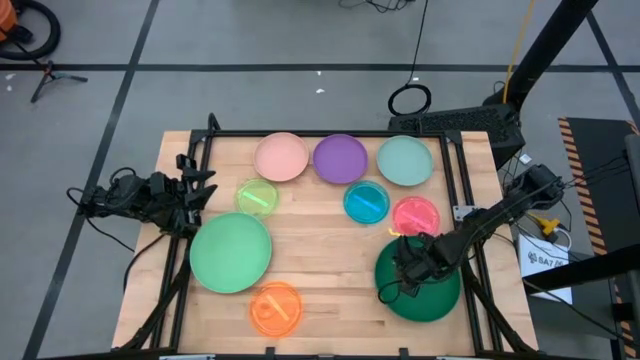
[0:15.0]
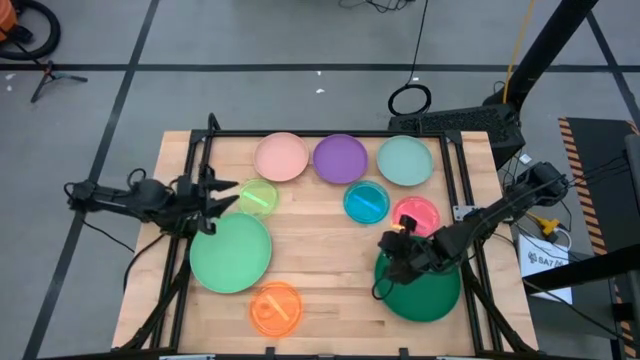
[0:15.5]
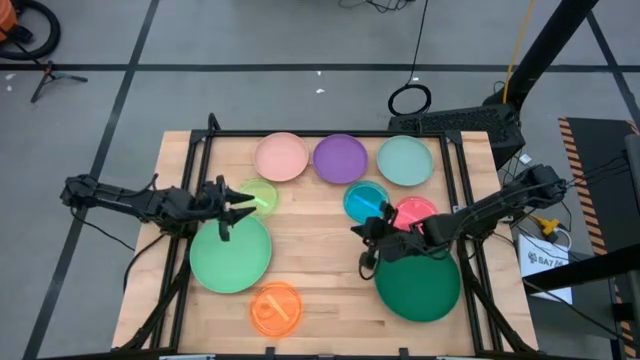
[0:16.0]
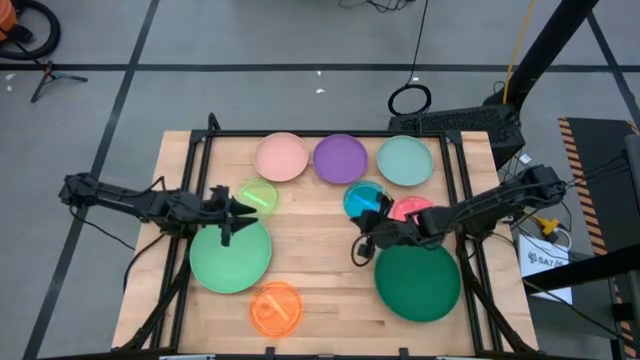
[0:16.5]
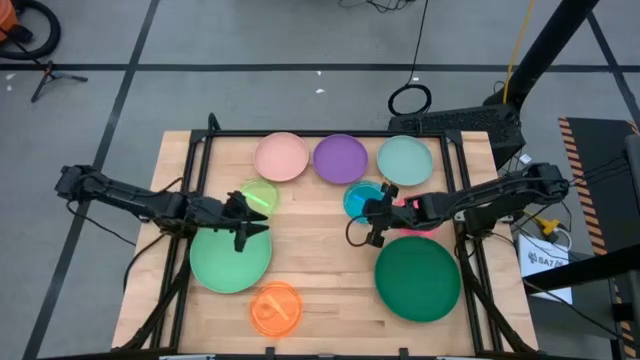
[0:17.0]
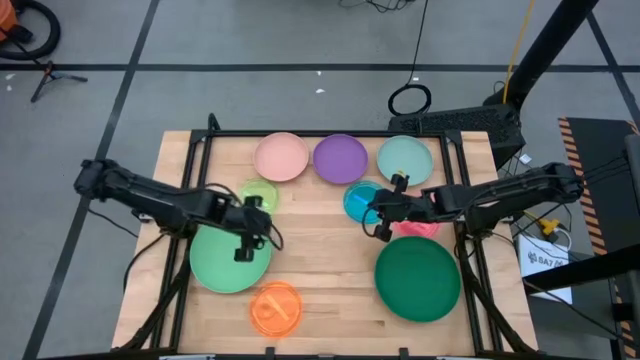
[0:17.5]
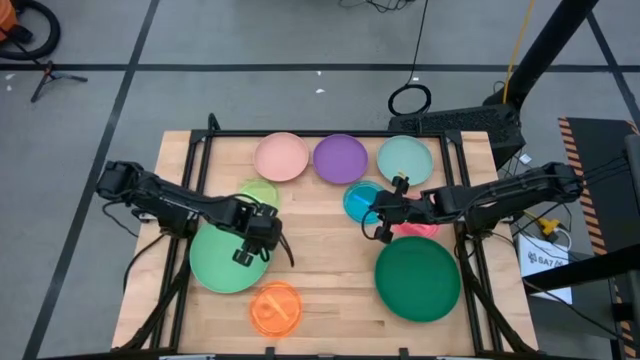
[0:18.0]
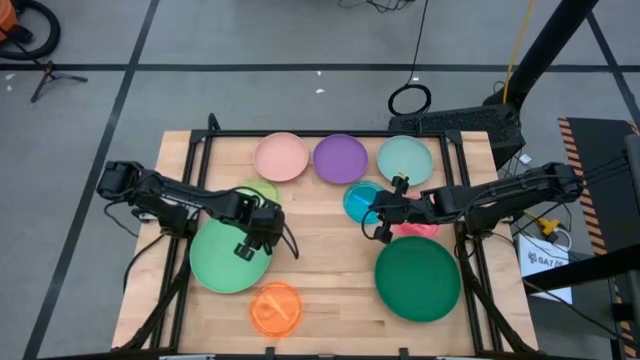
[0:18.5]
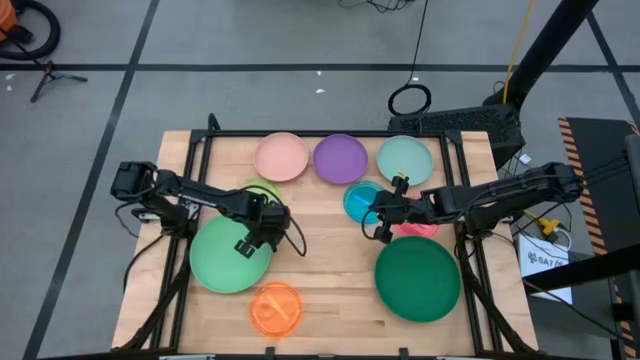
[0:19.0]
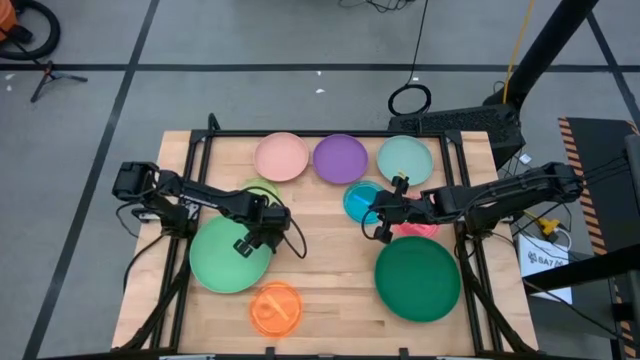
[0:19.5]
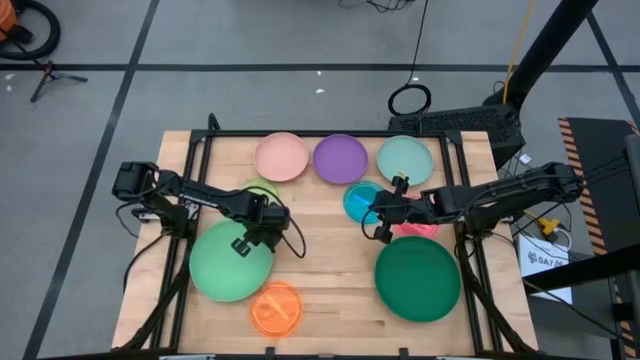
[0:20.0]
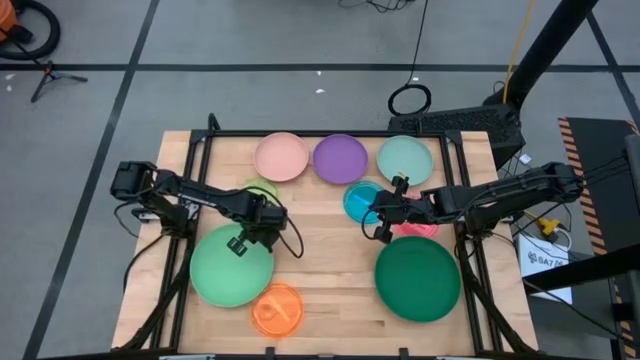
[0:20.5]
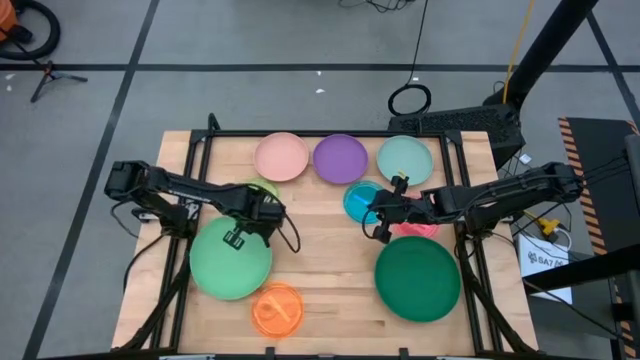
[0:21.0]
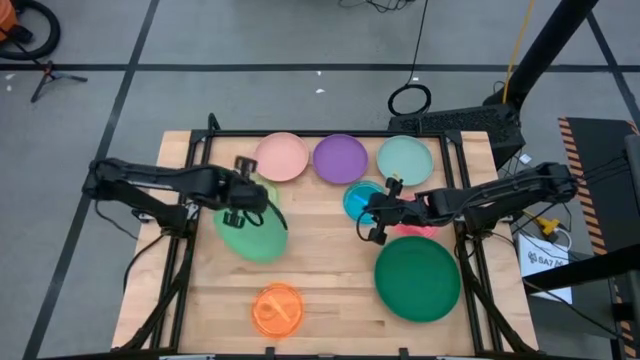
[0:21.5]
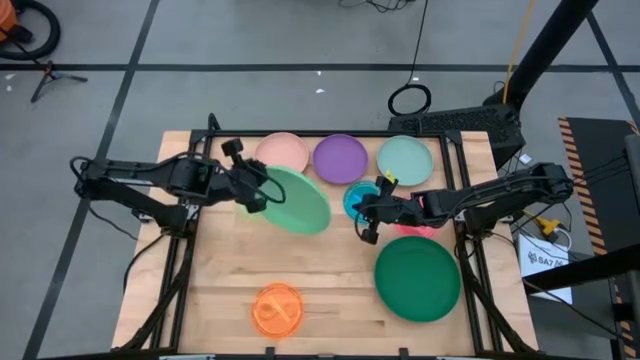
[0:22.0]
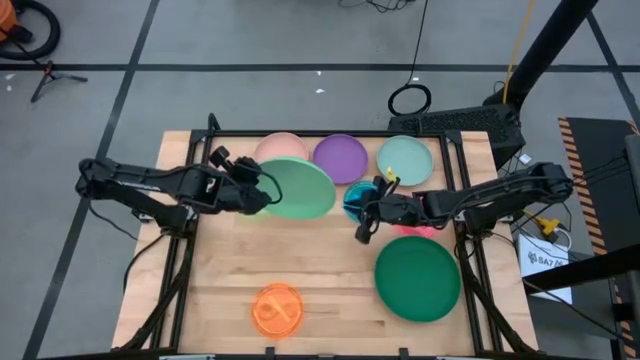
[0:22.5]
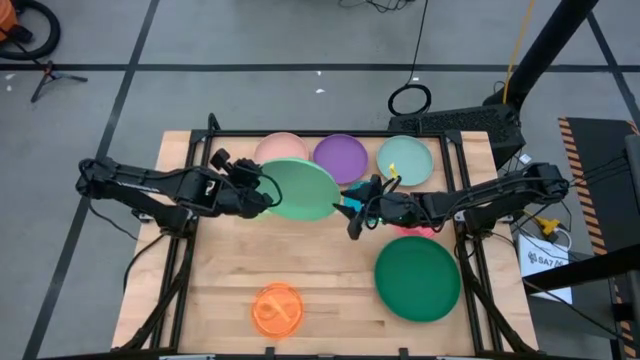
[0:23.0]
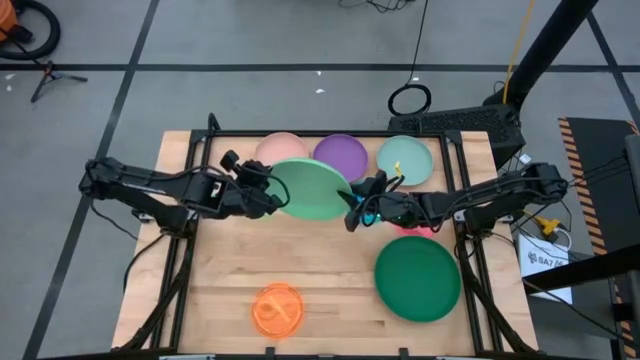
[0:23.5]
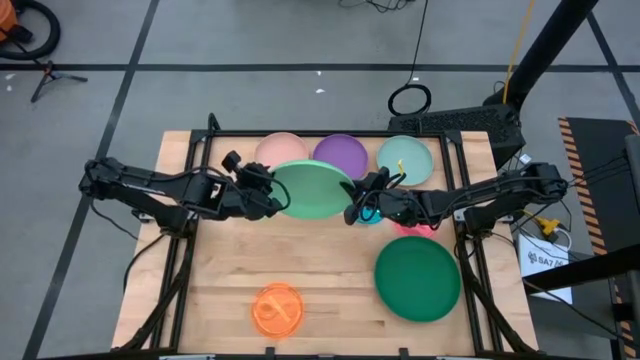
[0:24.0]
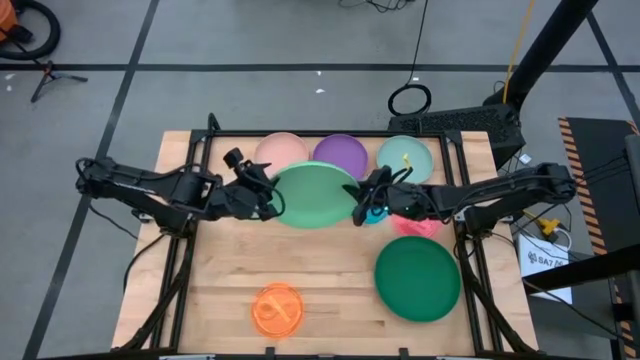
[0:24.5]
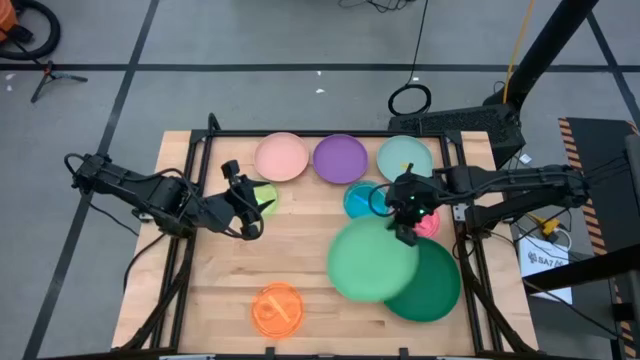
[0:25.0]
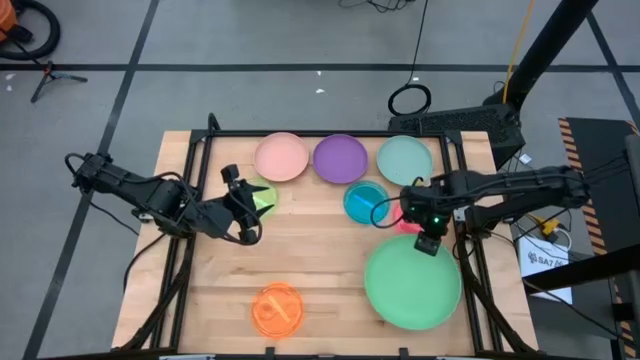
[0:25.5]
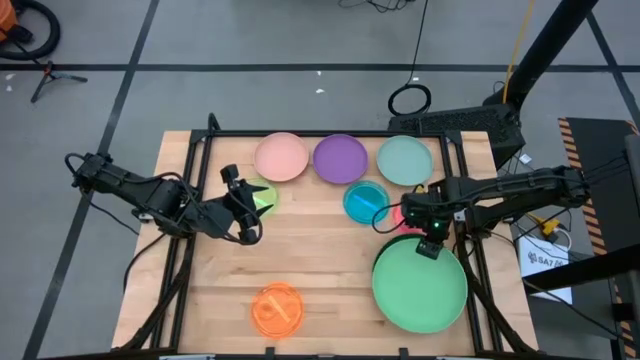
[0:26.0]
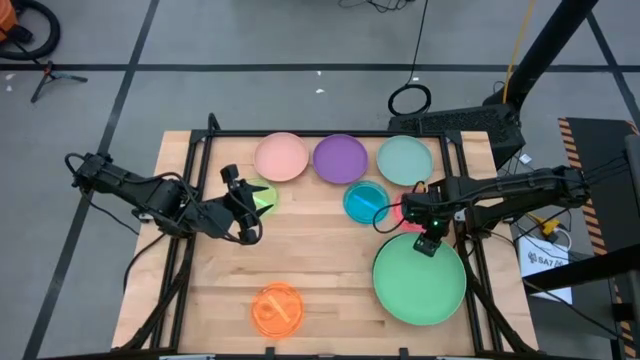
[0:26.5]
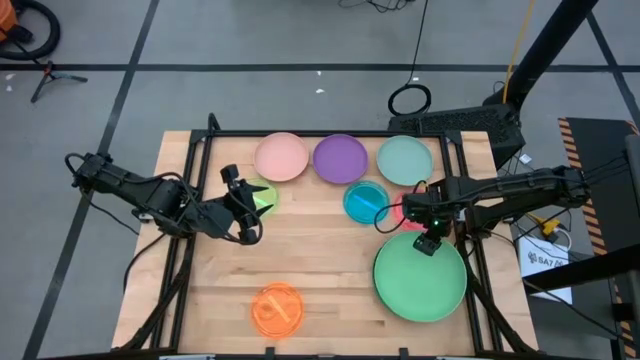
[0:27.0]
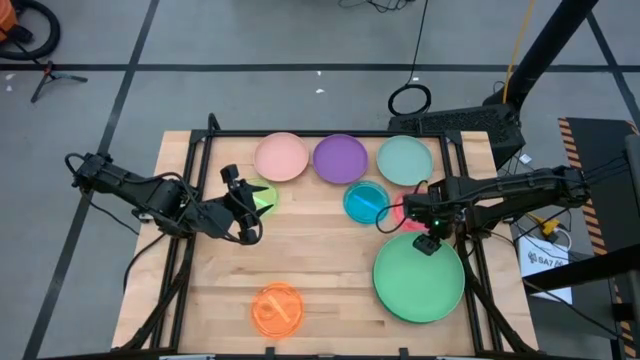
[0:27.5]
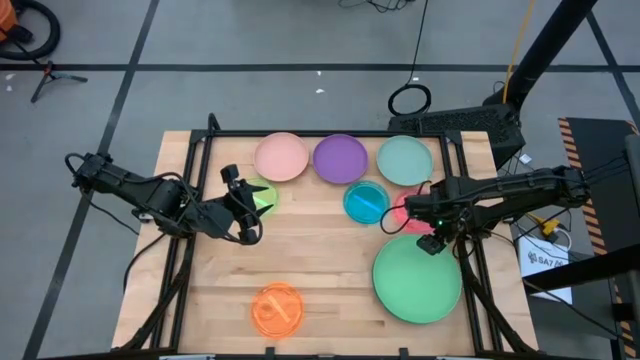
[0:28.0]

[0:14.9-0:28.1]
Task: Stack plastic plates
Stack the light green plate on top of the green plate

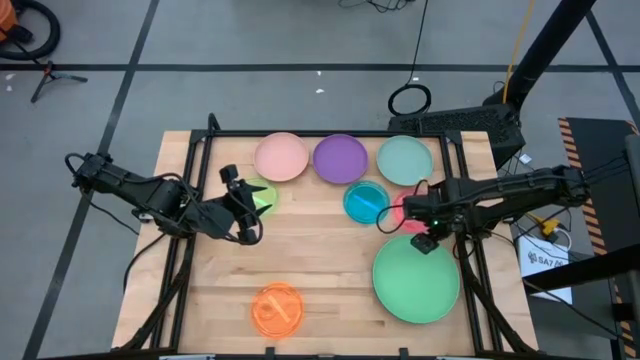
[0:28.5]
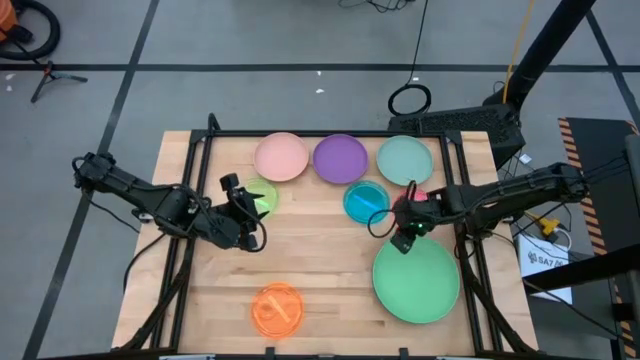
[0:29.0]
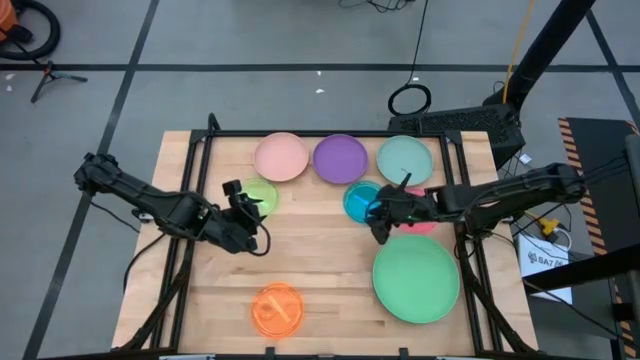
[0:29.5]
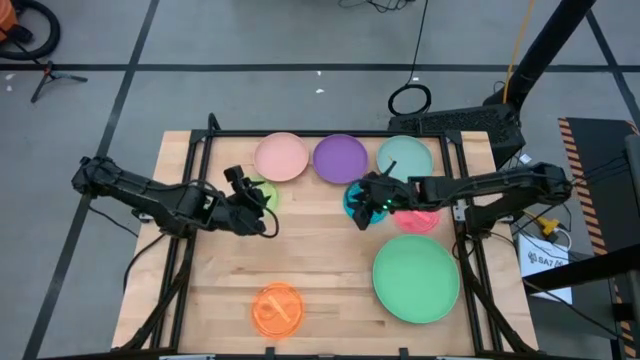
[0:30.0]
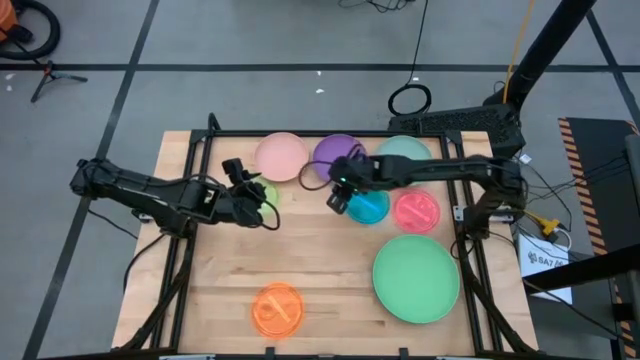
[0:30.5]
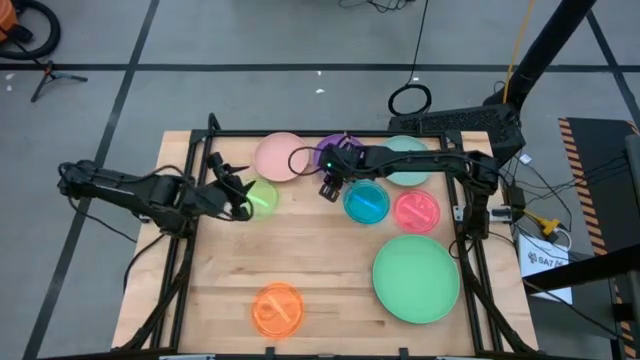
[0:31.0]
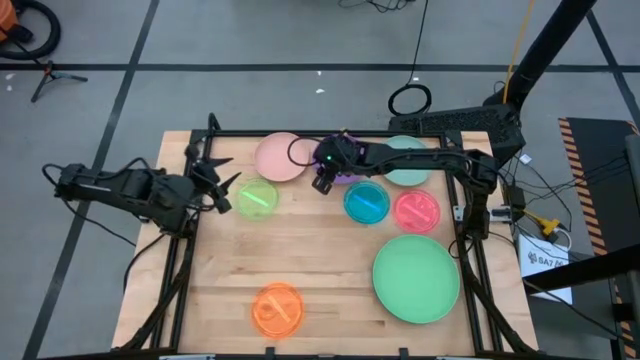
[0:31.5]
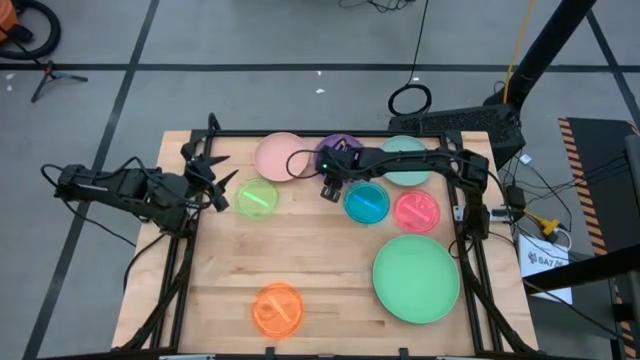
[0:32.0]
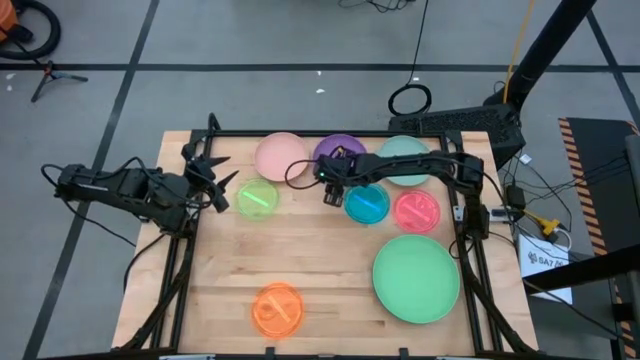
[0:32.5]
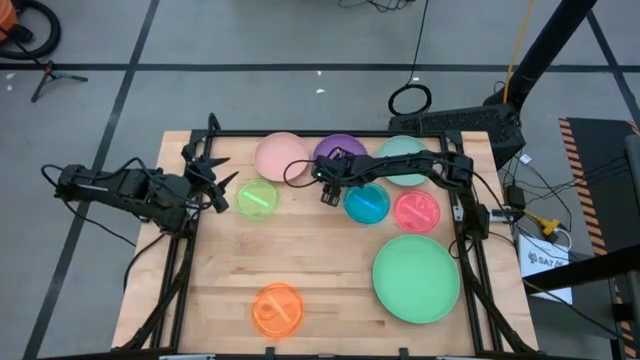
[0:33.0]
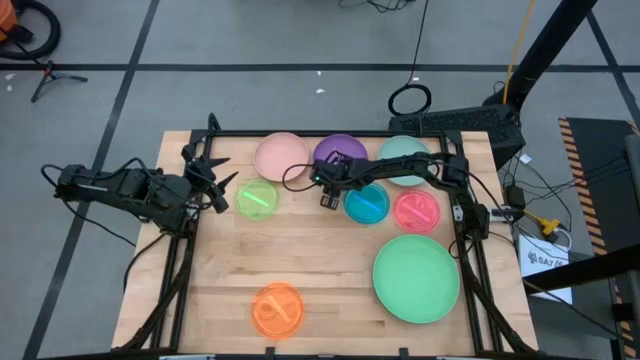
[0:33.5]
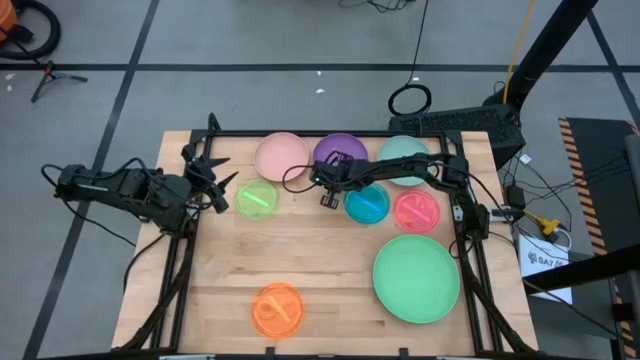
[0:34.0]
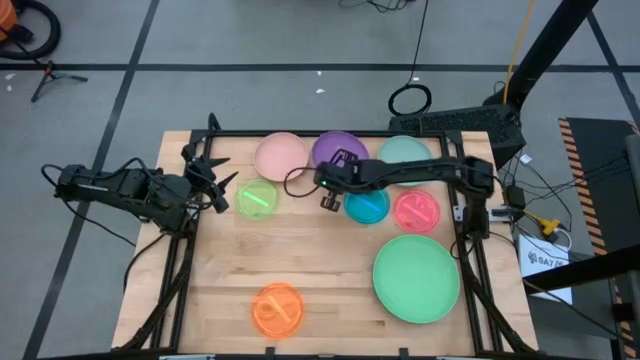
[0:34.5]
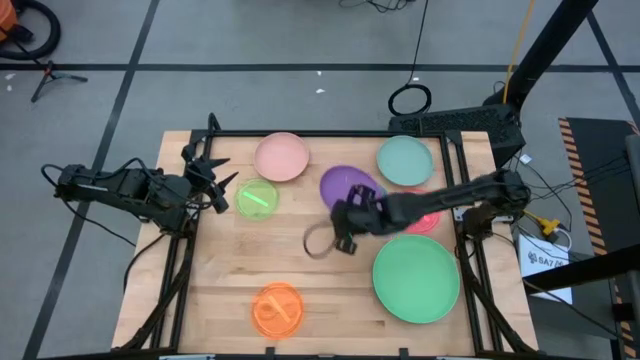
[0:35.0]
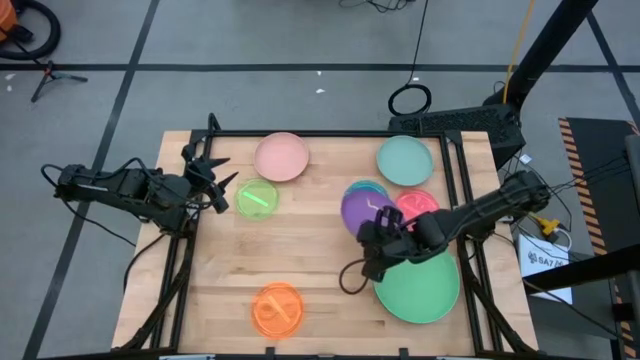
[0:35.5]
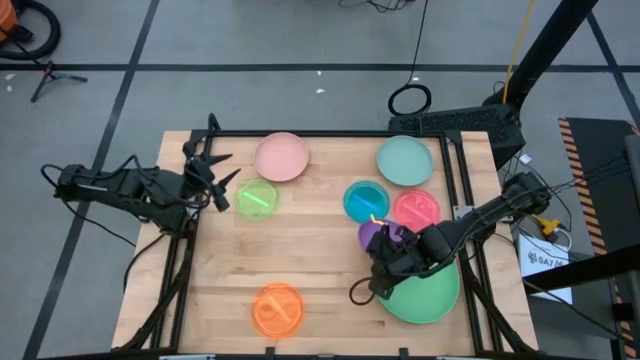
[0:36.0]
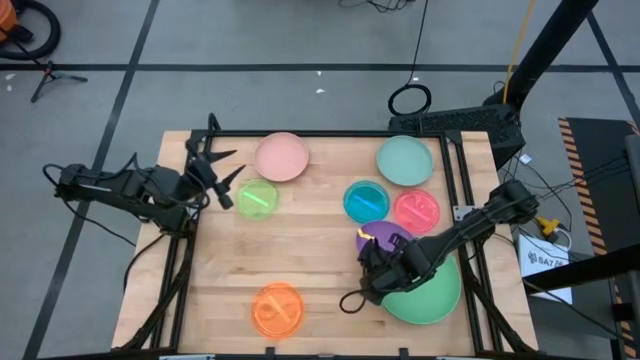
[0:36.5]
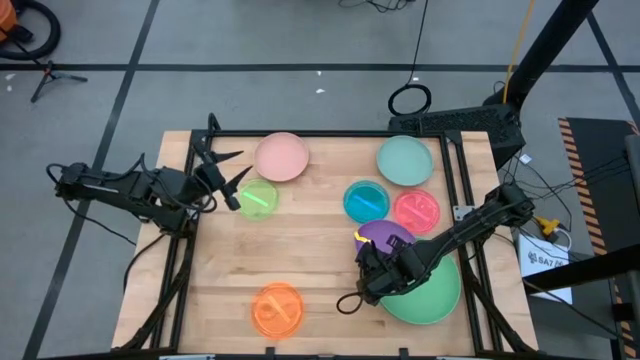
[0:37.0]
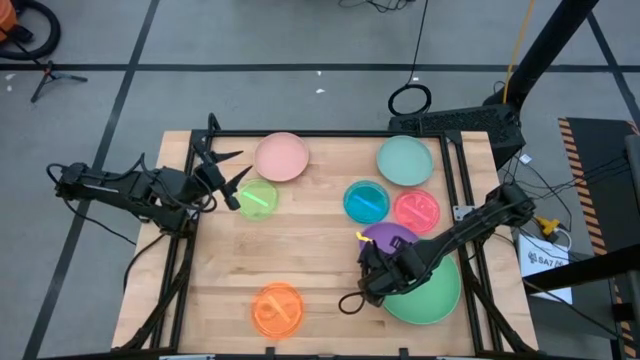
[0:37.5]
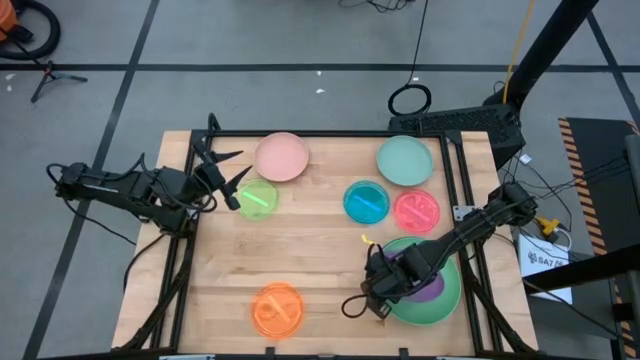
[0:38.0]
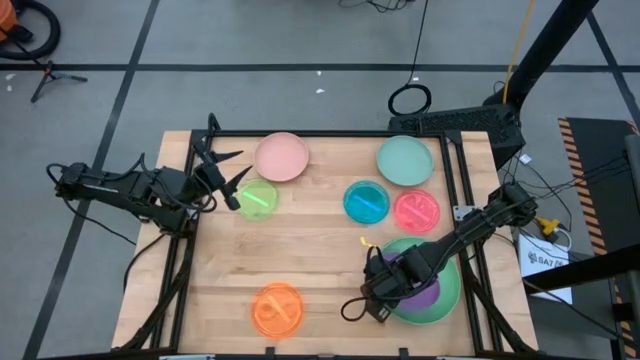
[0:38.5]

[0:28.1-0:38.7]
Stack the purple plate on top of the light green plate
